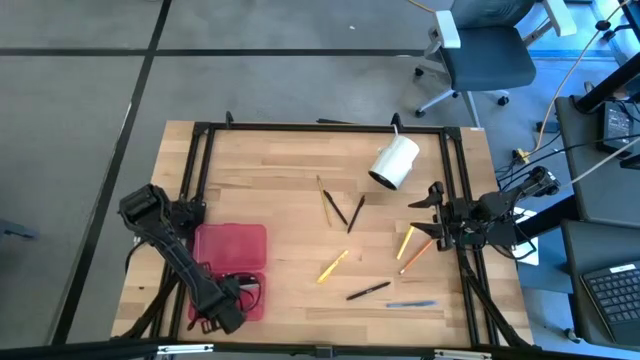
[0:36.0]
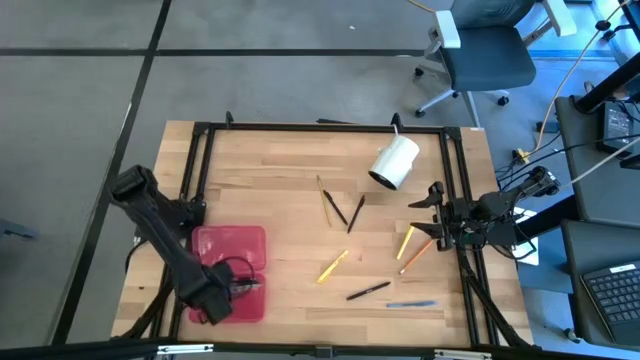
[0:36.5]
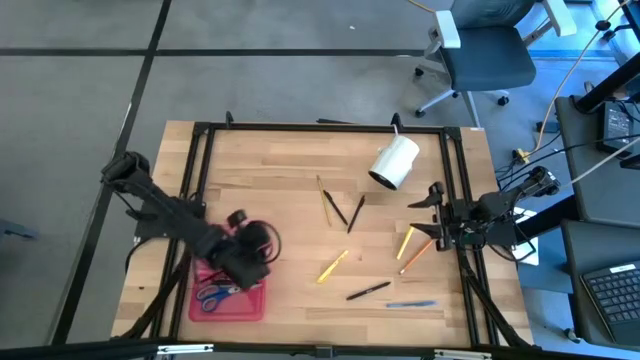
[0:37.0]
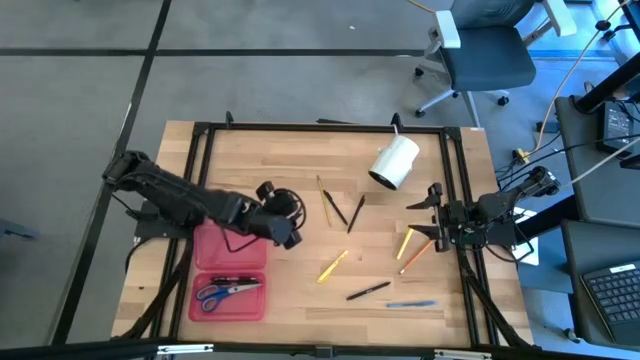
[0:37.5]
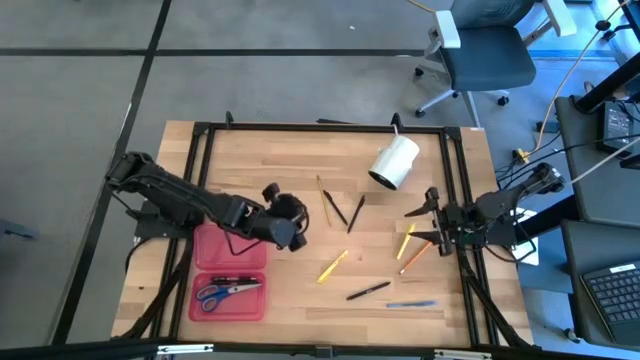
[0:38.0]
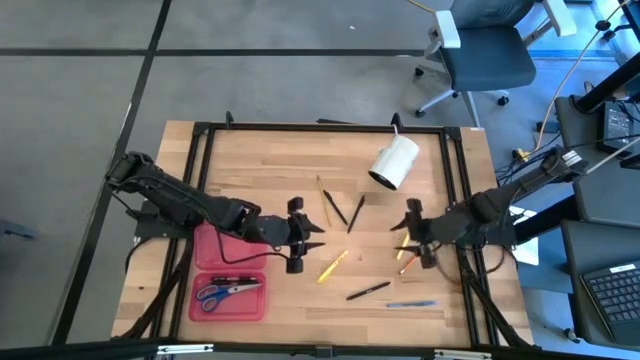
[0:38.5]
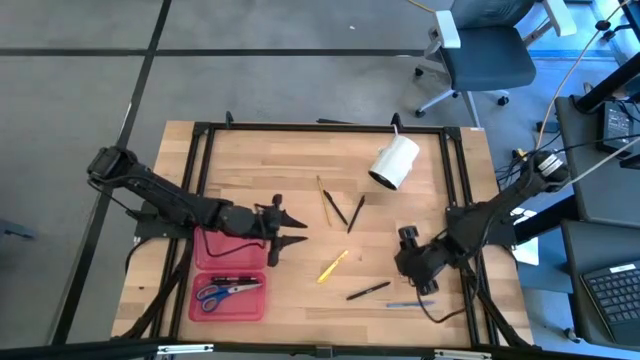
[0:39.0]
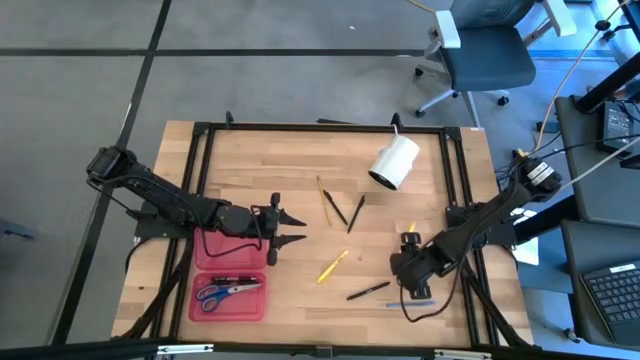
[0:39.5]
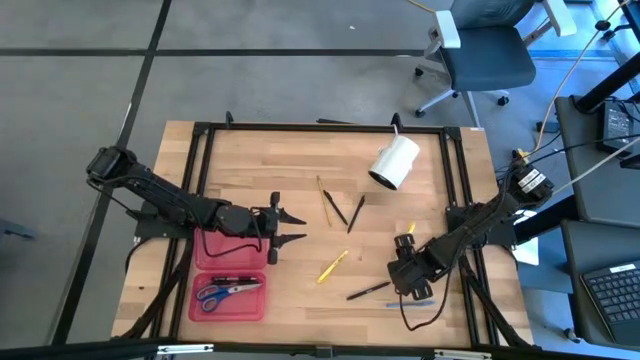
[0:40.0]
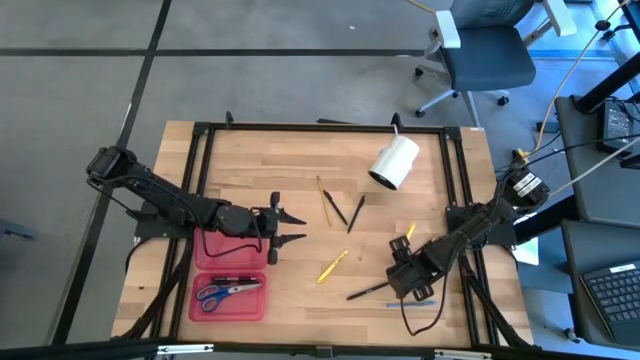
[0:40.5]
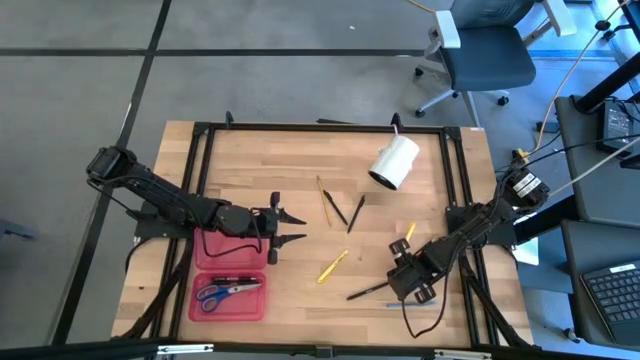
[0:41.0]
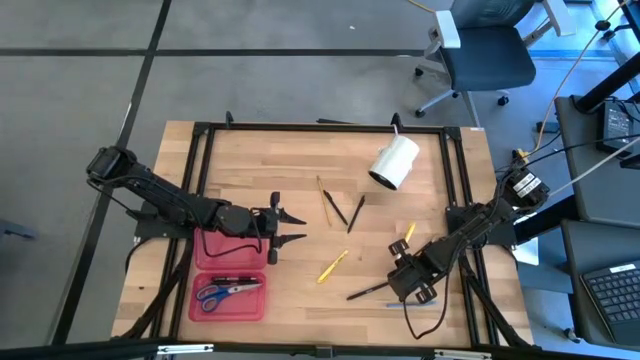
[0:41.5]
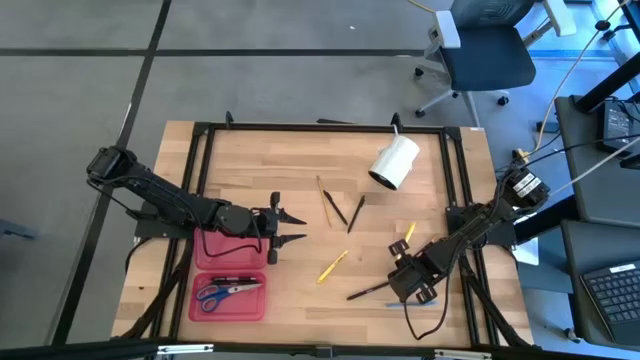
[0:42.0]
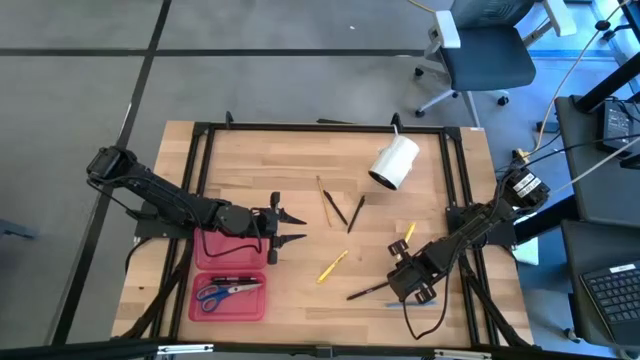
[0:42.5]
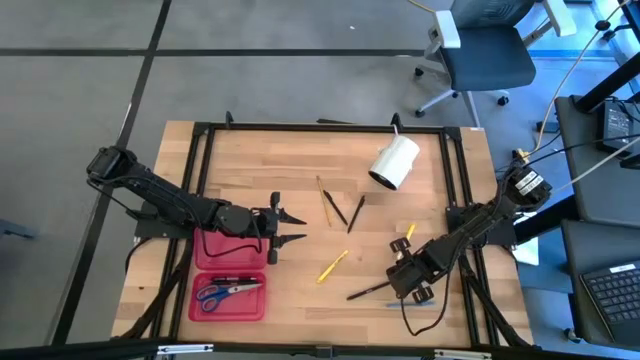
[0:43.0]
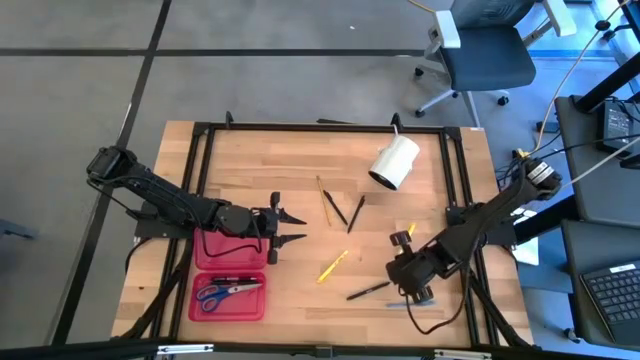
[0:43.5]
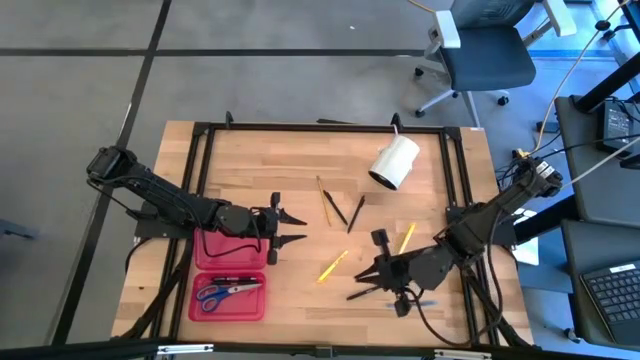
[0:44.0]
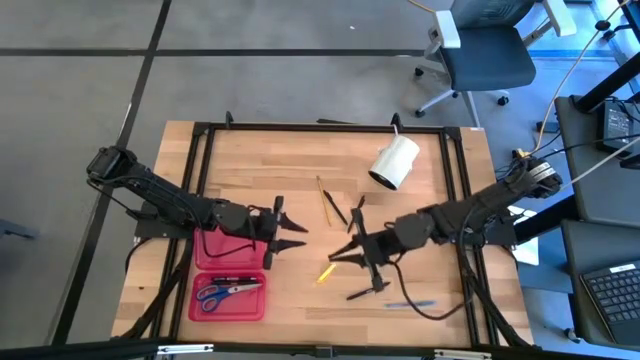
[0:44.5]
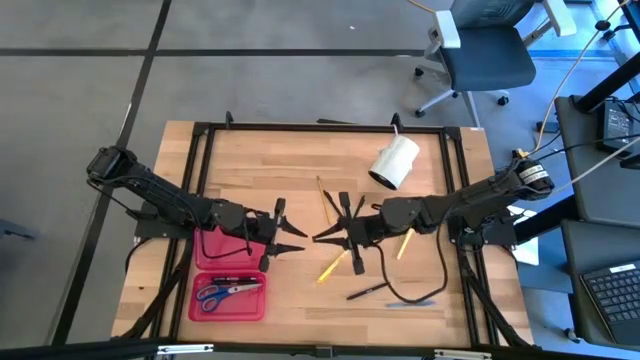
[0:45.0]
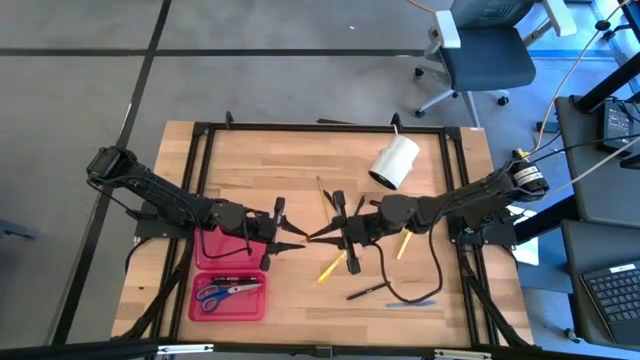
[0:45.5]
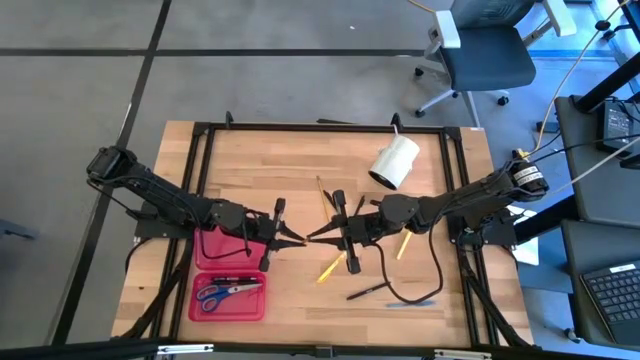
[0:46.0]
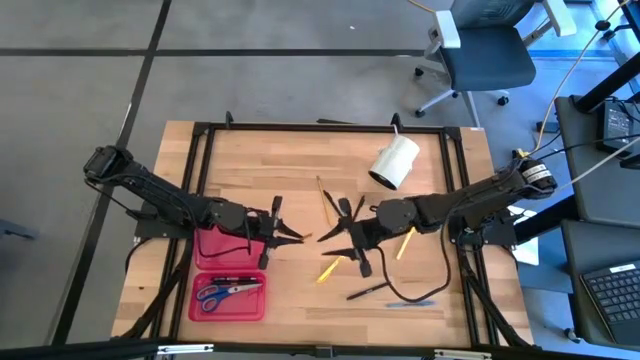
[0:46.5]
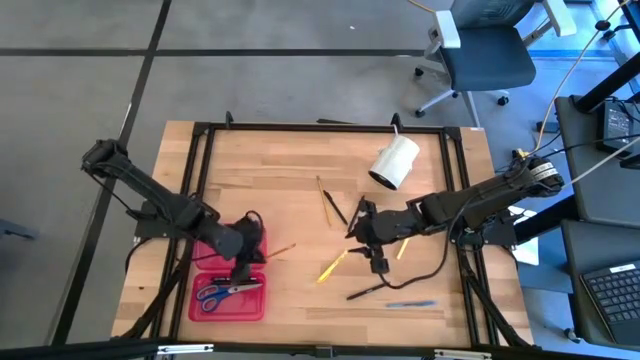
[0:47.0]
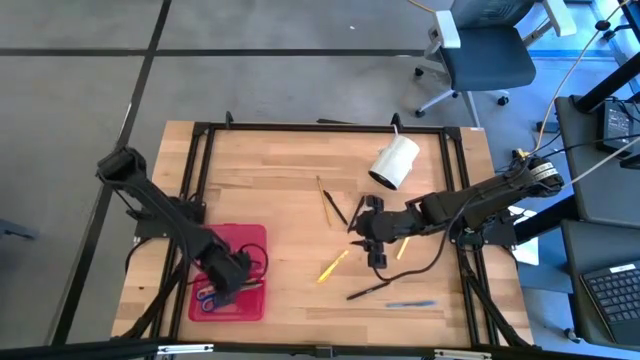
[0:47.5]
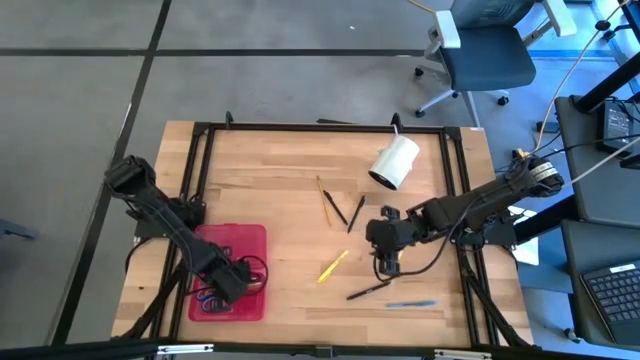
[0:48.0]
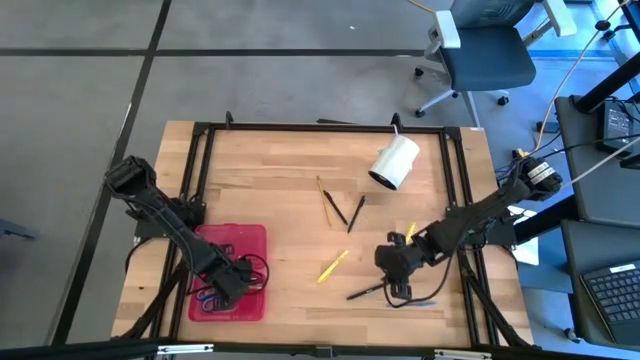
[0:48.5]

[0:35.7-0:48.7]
Task: Pick & place school supplies into a supply box
Put the orange pencil into the red supply box

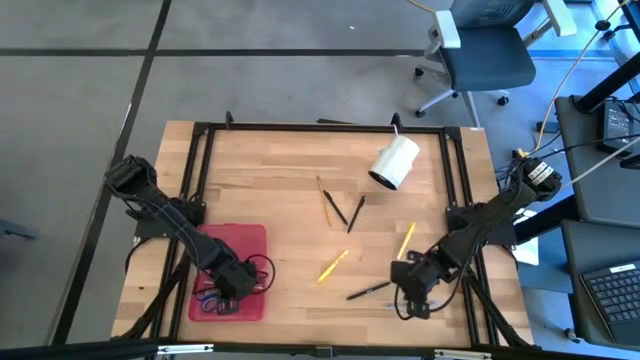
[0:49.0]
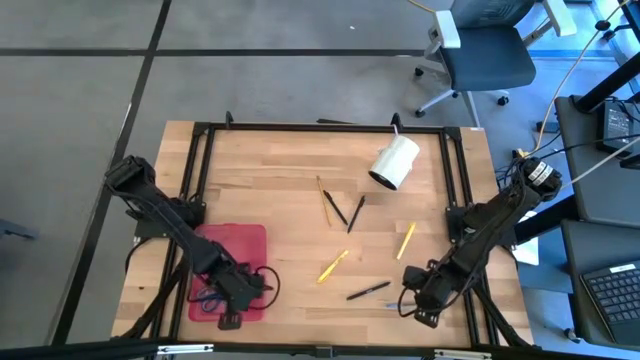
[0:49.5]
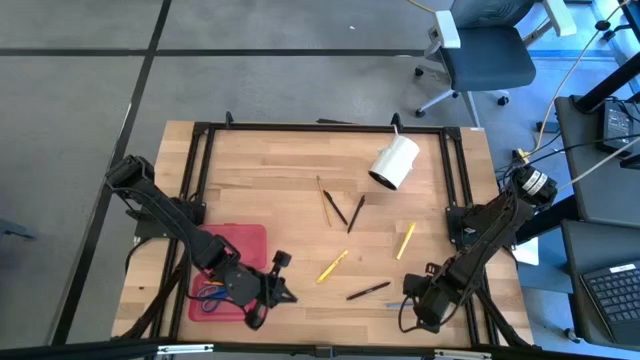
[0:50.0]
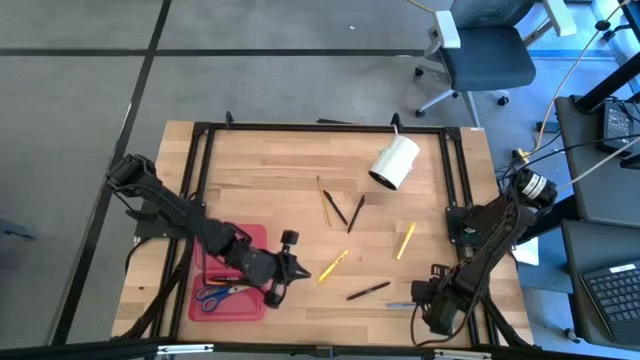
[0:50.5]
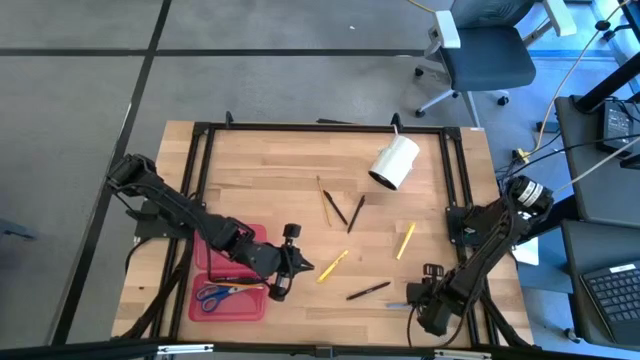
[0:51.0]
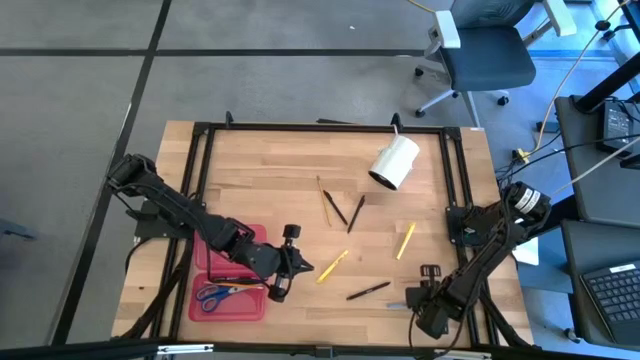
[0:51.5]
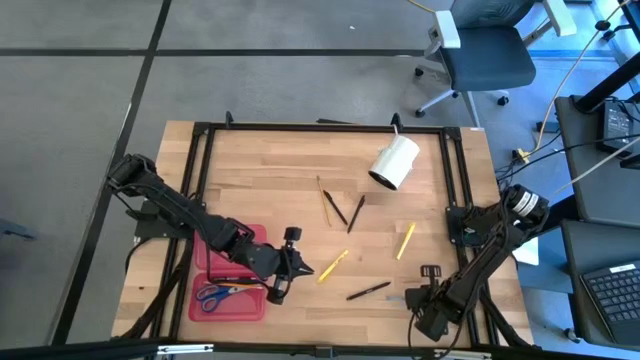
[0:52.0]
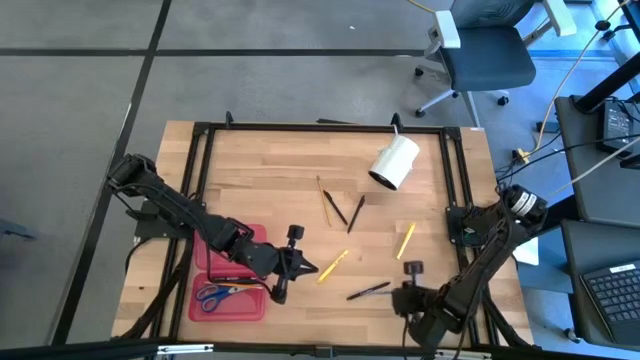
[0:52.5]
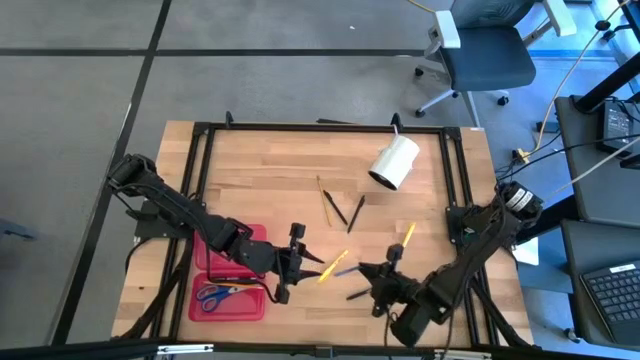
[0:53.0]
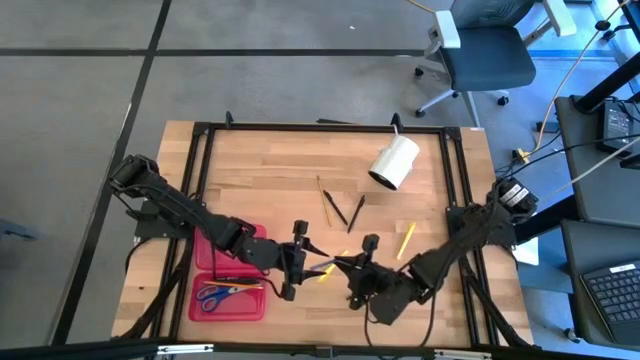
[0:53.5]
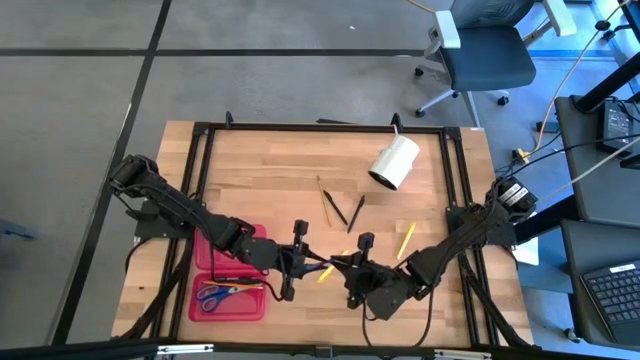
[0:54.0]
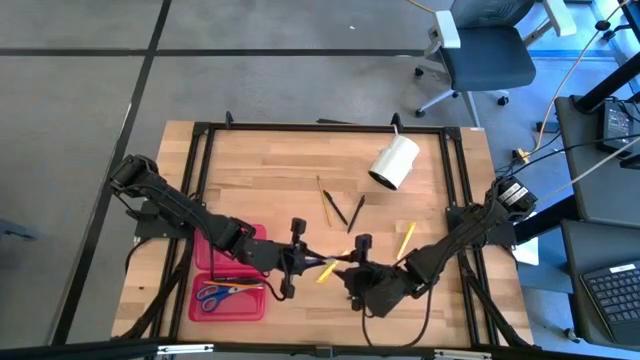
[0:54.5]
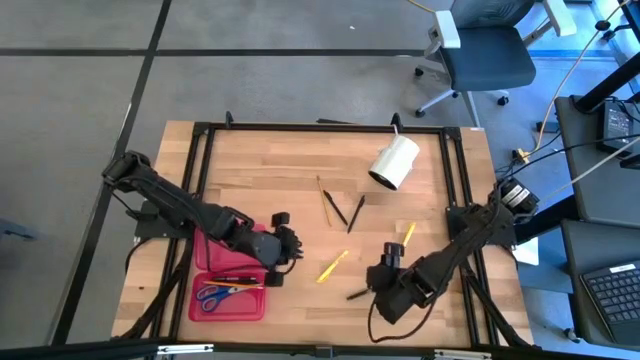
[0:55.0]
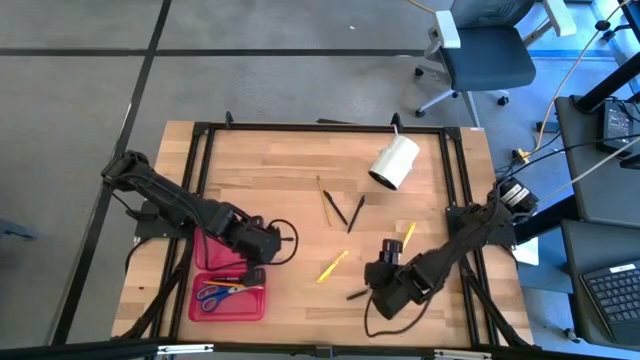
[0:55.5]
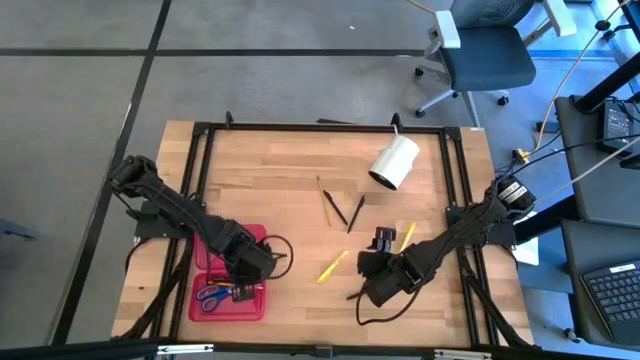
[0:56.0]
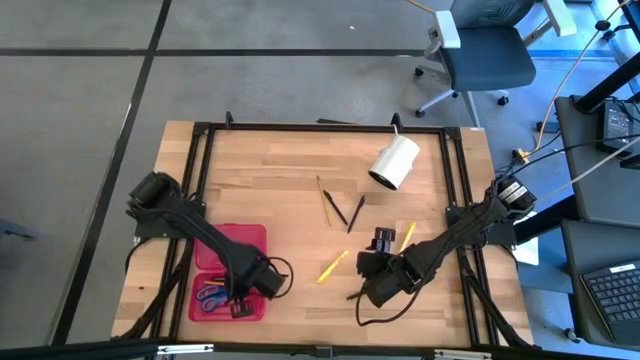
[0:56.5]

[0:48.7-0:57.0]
Put the blue pen into the red supply box
